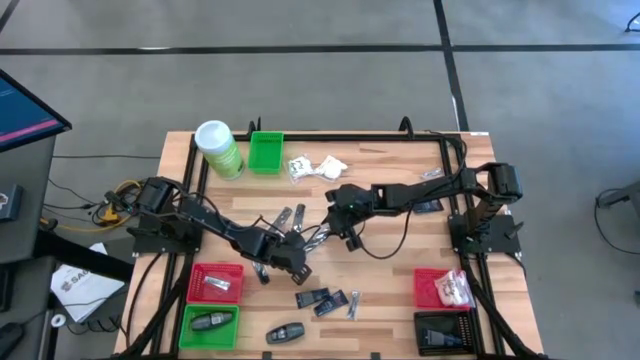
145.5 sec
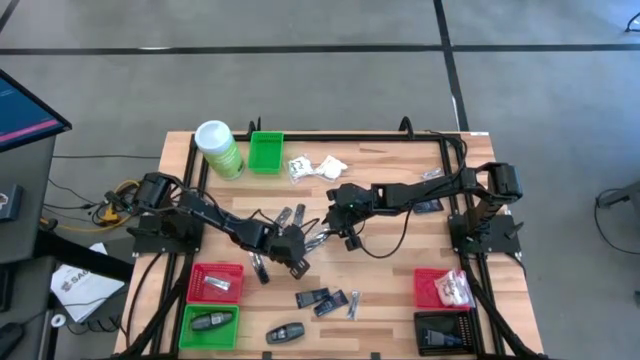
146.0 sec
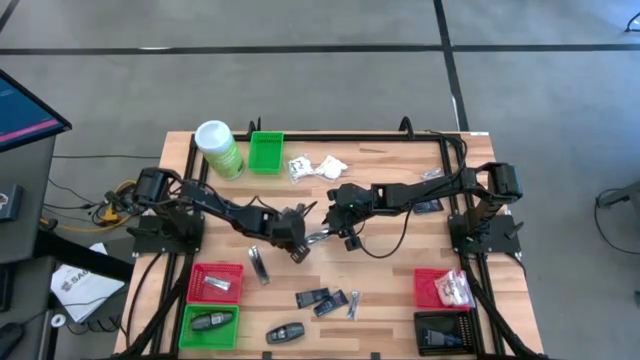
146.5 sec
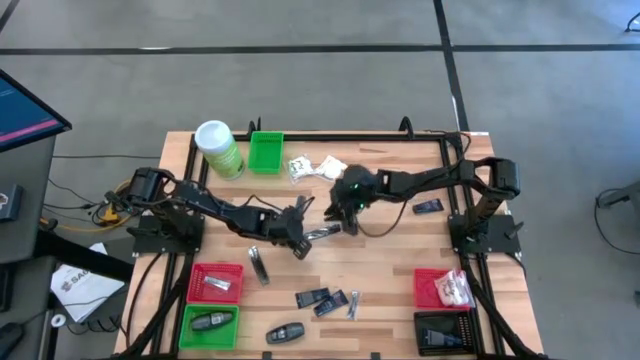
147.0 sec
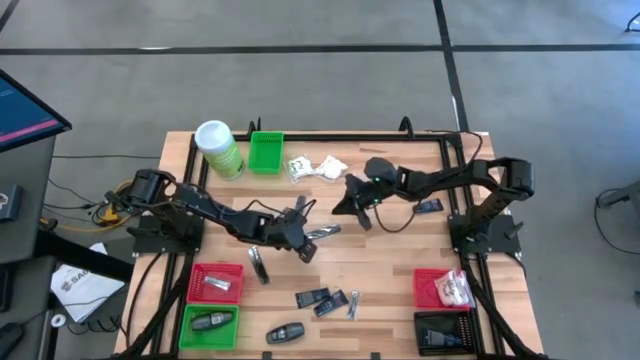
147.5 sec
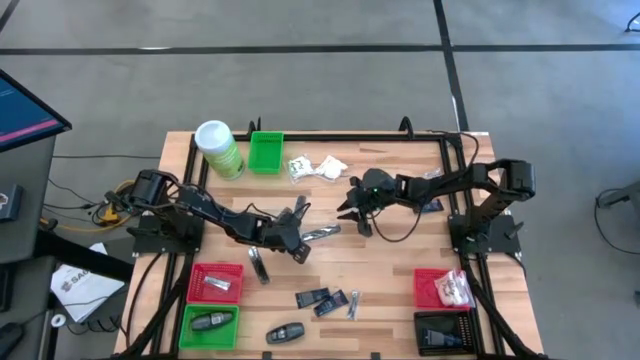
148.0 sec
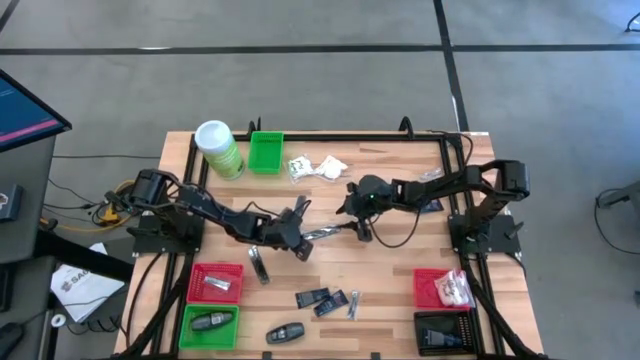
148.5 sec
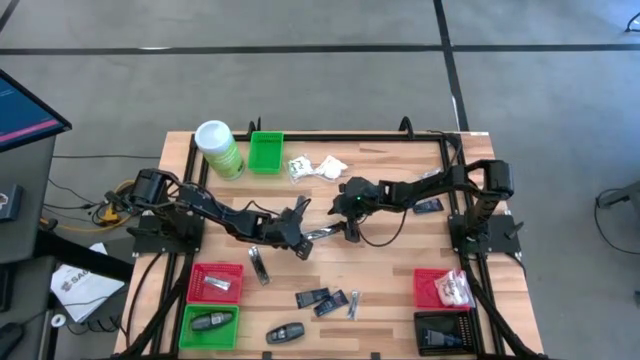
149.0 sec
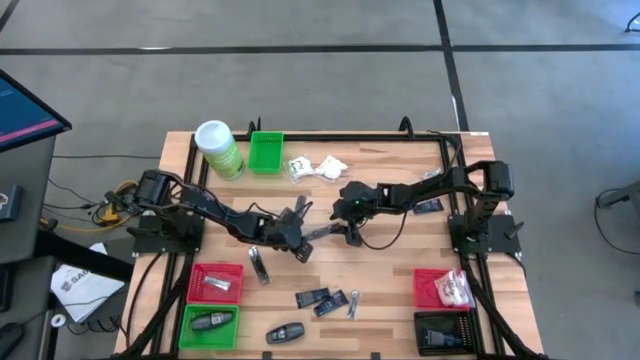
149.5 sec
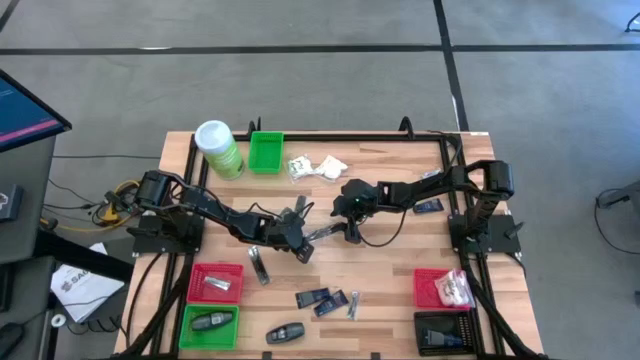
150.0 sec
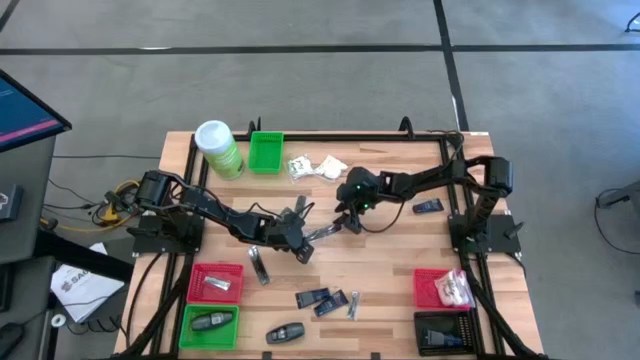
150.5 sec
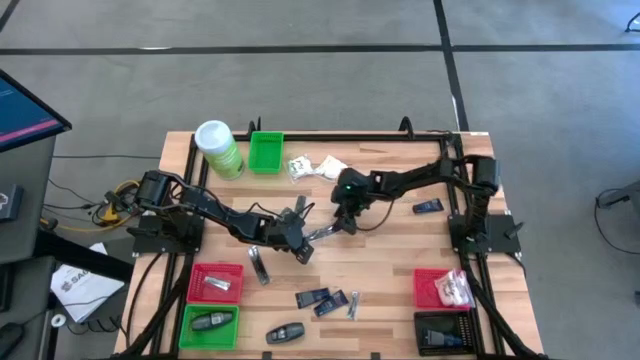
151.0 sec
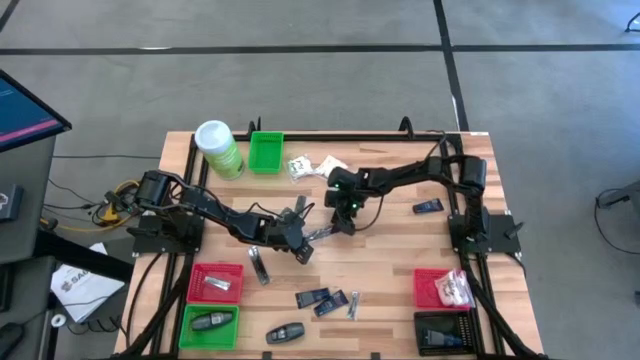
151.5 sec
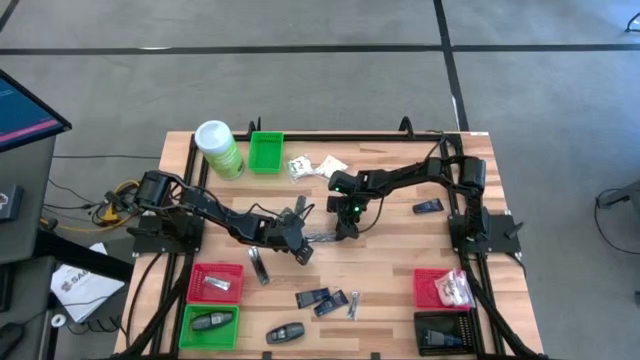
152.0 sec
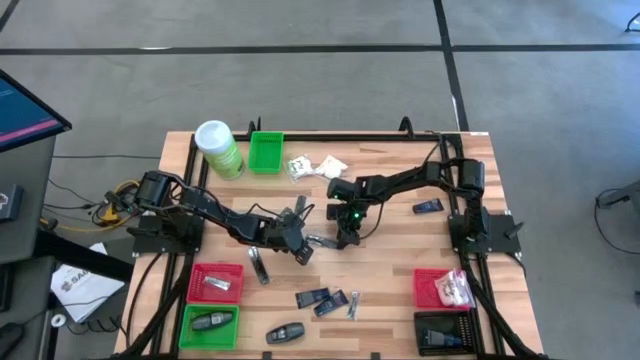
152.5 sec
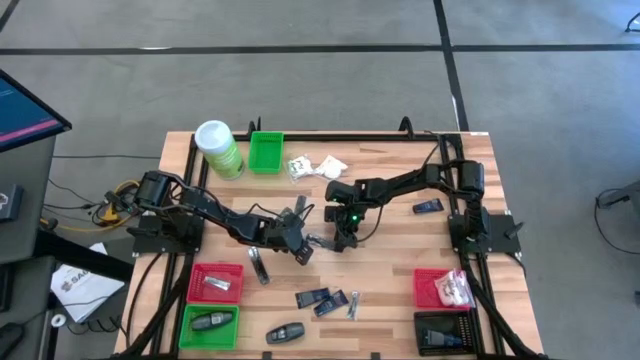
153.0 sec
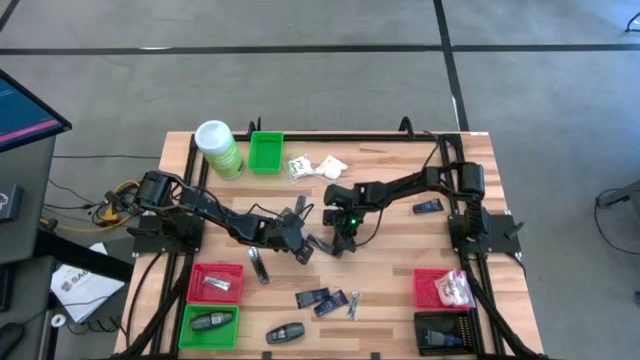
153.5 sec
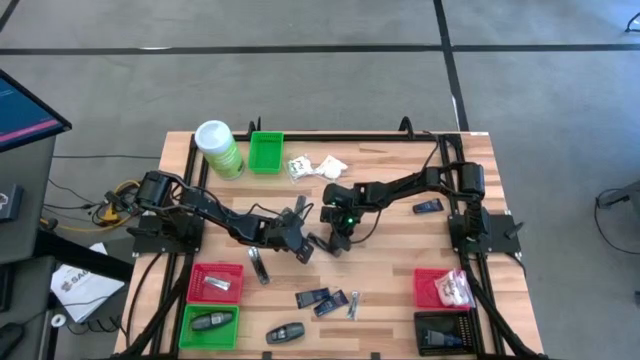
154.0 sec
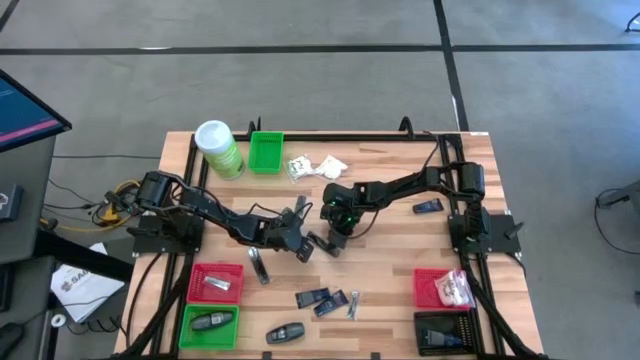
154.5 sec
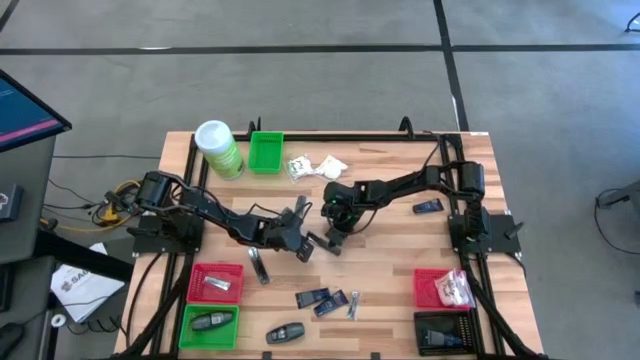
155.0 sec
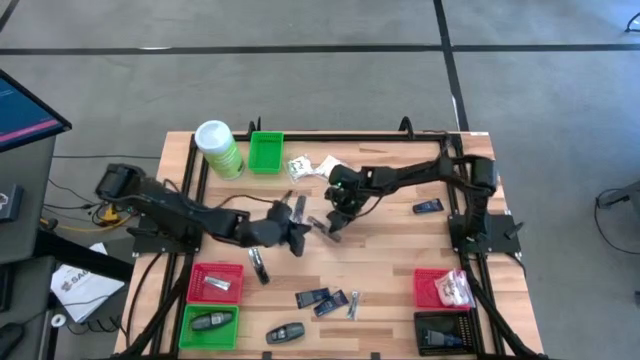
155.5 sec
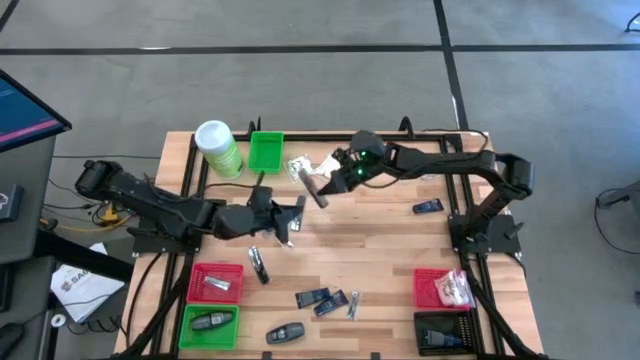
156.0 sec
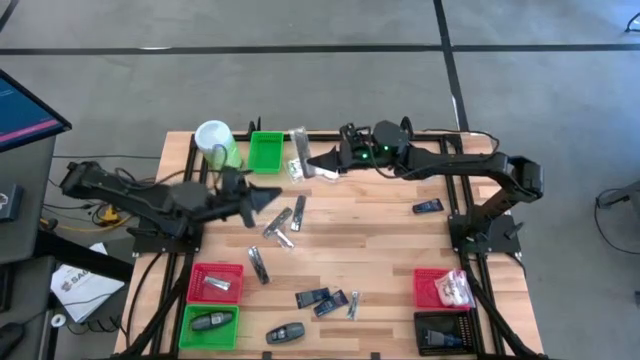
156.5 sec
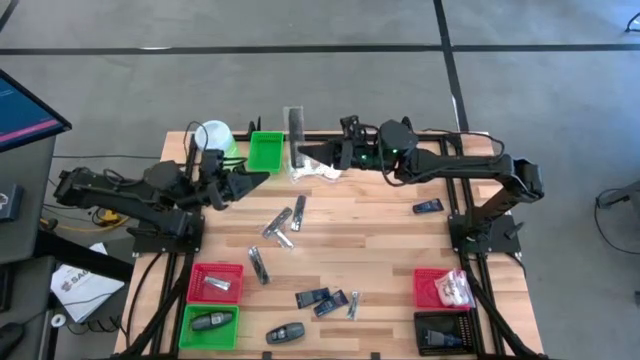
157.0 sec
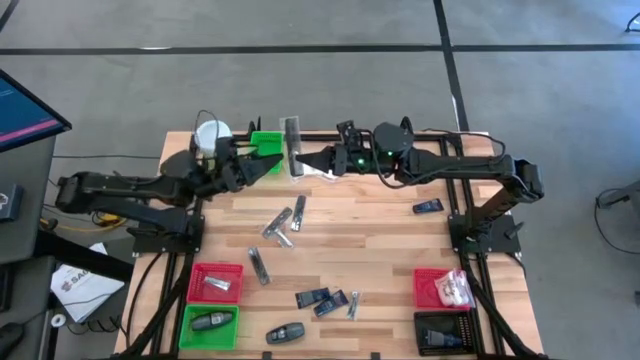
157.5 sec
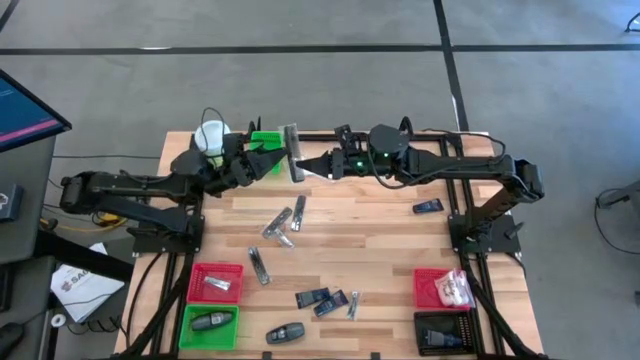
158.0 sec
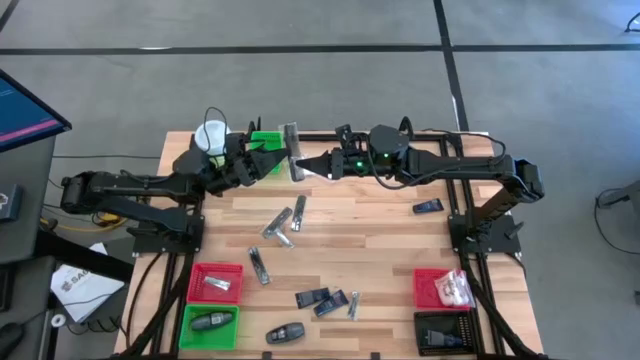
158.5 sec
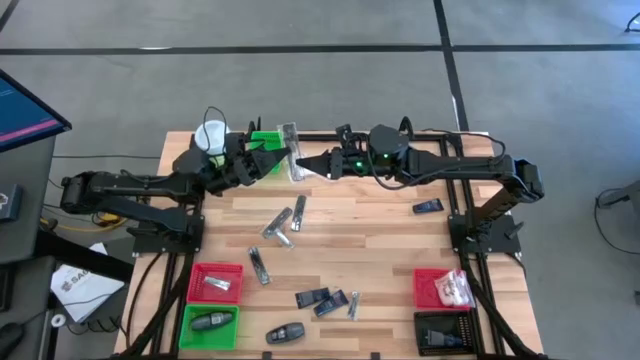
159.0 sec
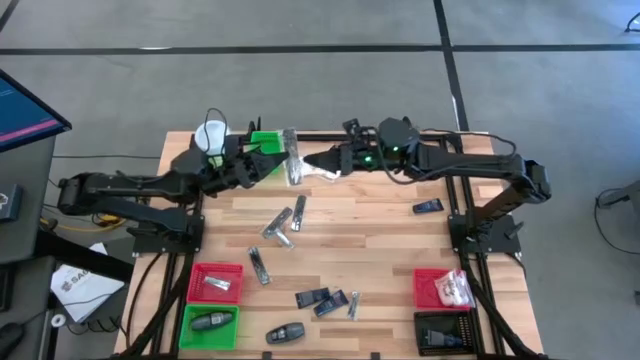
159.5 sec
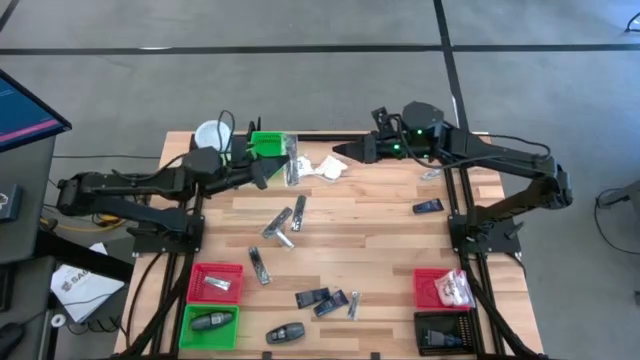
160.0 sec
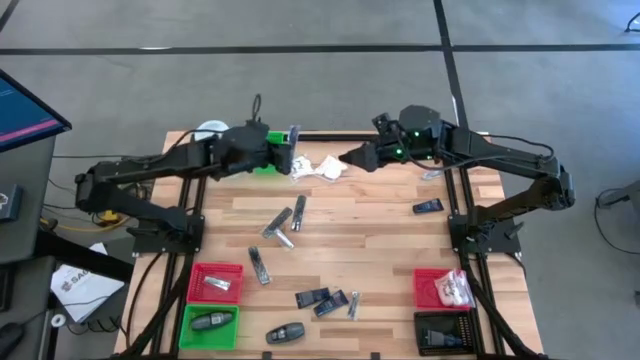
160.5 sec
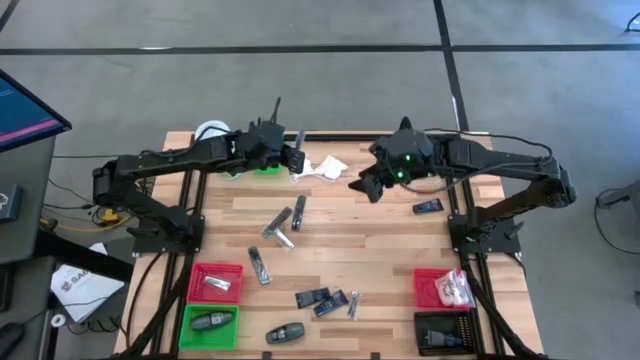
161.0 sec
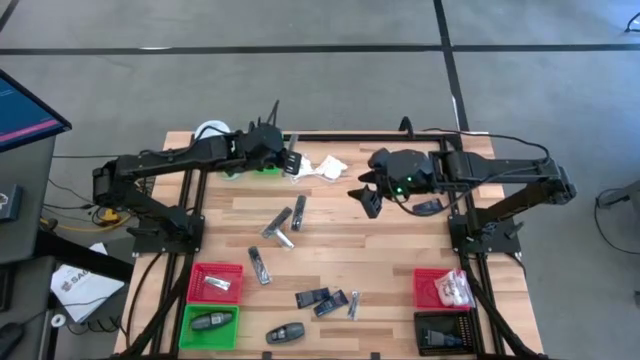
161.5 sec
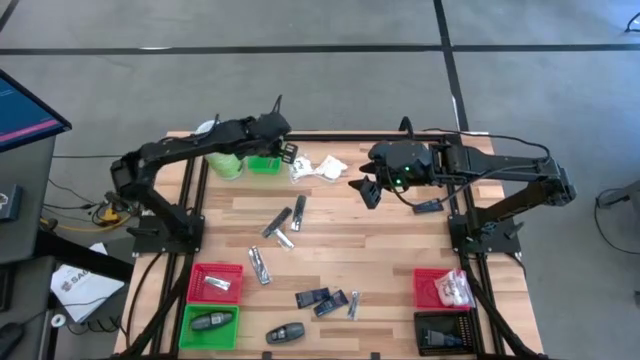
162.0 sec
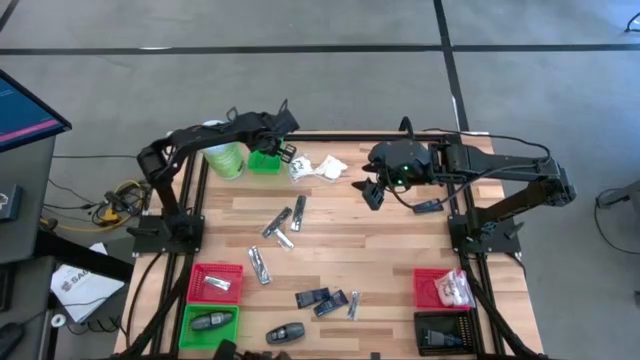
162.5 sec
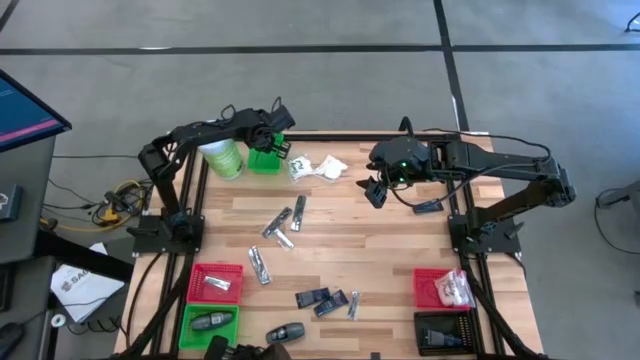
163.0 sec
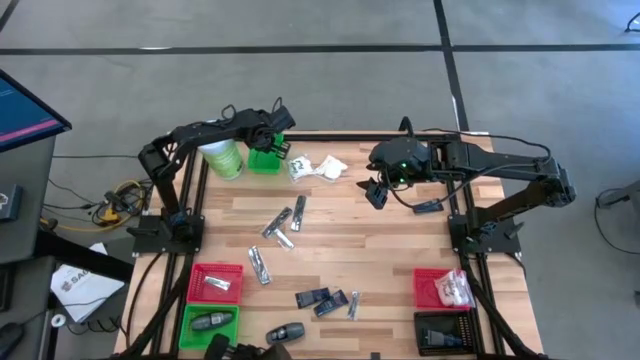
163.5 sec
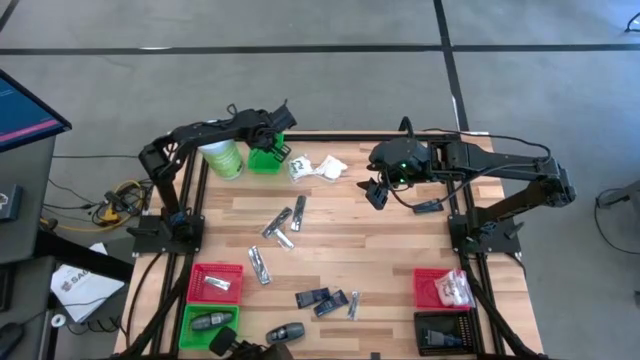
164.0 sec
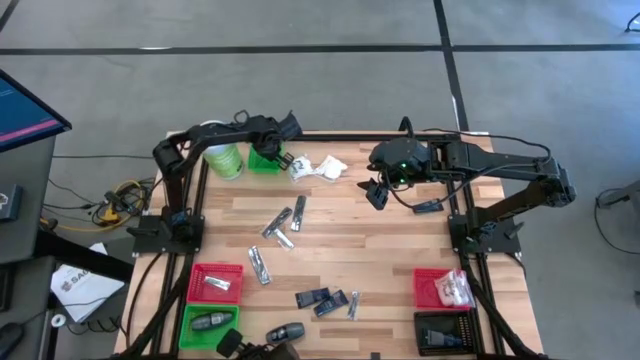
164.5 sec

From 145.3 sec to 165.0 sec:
Task: Pick & Place Travel size toiletries
Put the black comb into the top green bin

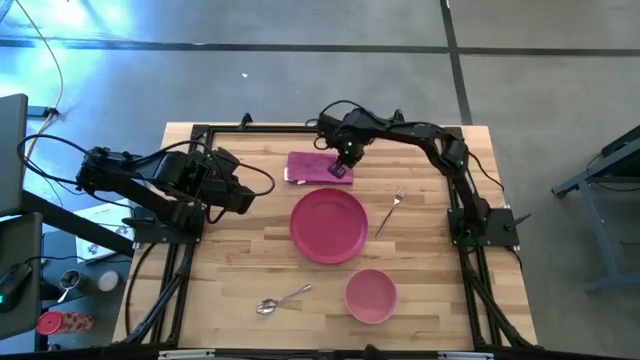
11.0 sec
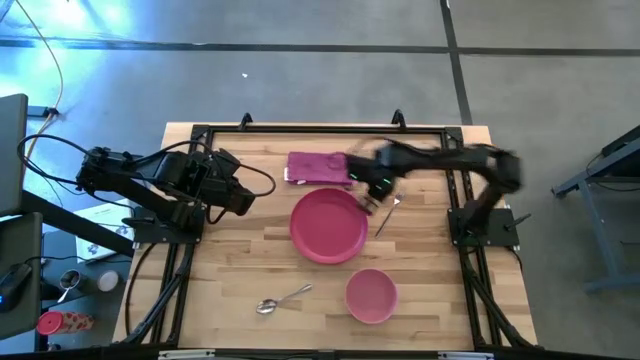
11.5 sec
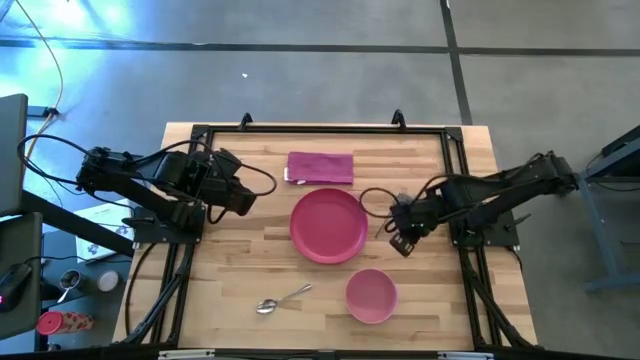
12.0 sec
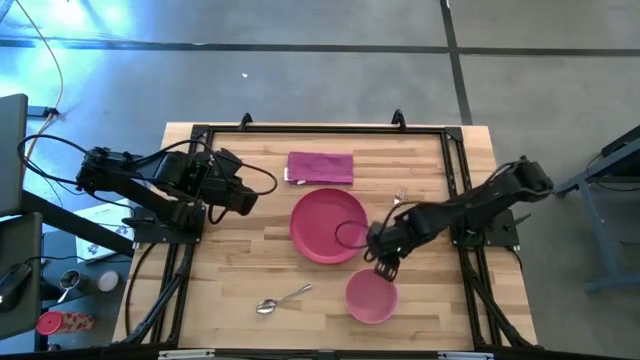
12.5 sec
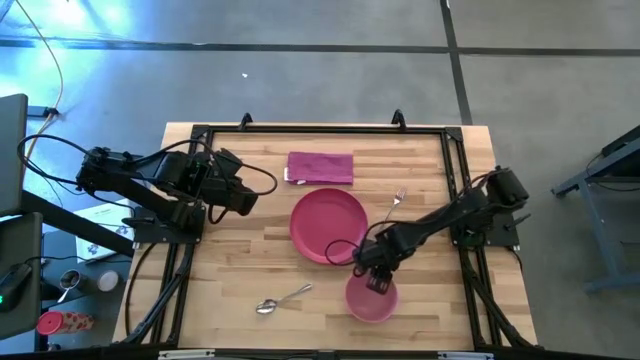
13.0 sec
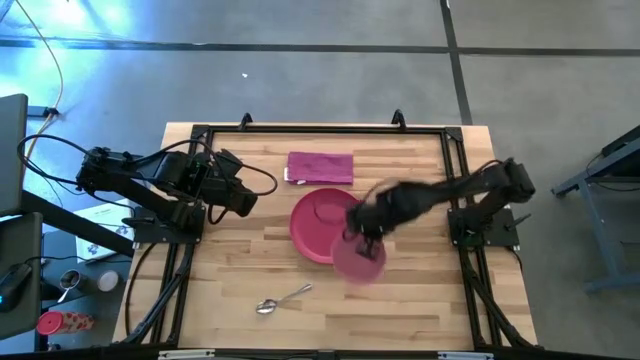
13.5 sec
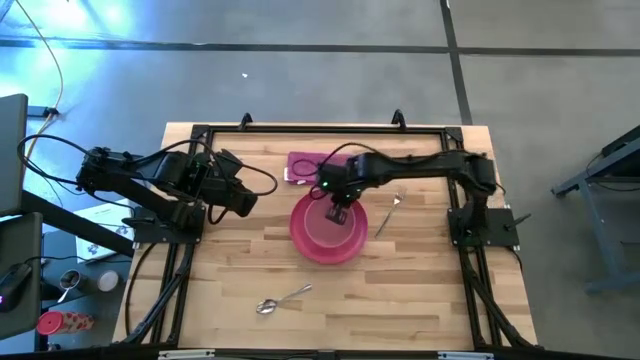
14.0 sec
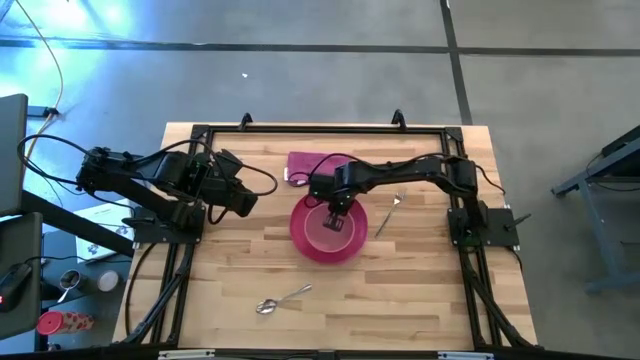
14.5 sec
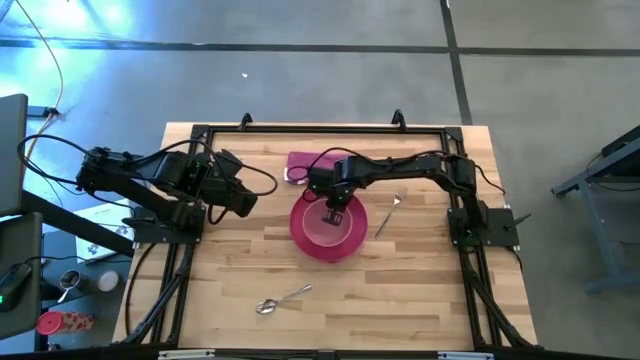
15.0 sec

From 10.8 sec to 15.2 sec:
Task: Set table place
Put the pink bowl on top of the red plate
